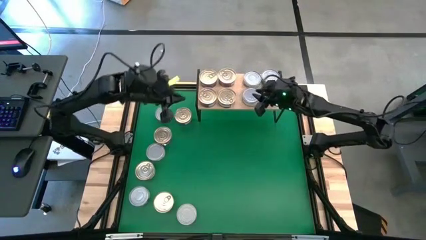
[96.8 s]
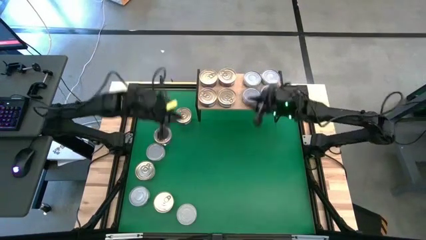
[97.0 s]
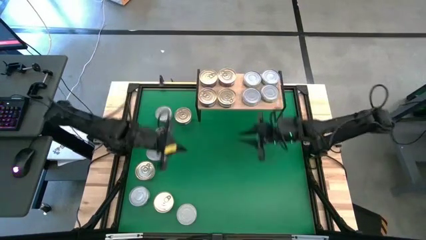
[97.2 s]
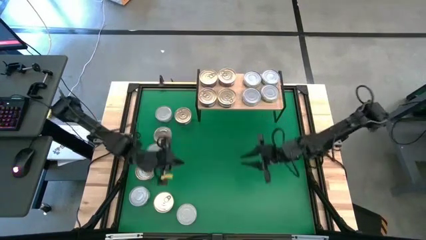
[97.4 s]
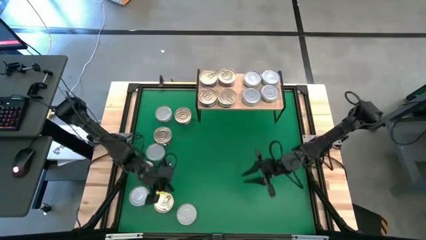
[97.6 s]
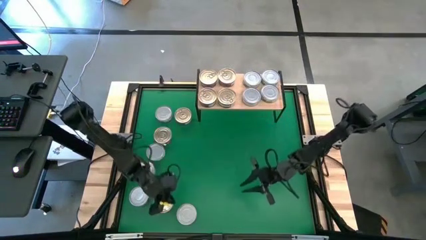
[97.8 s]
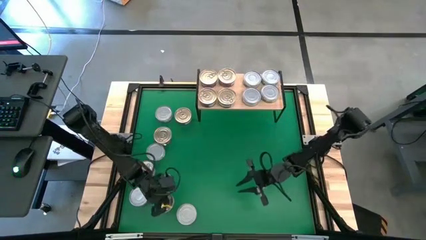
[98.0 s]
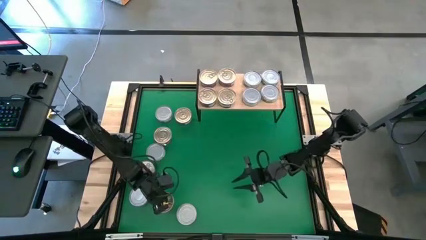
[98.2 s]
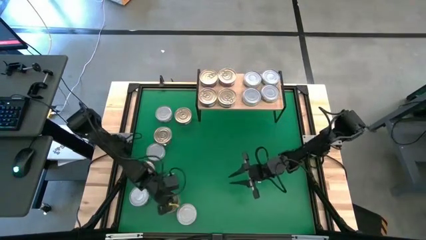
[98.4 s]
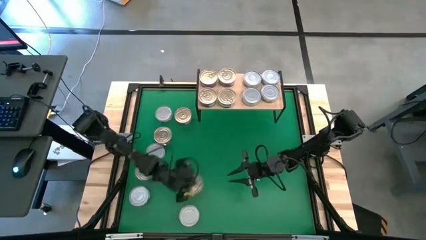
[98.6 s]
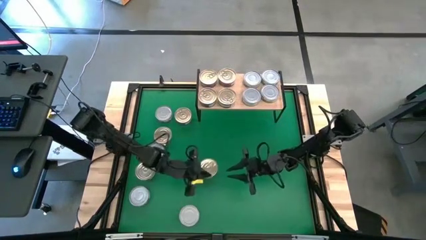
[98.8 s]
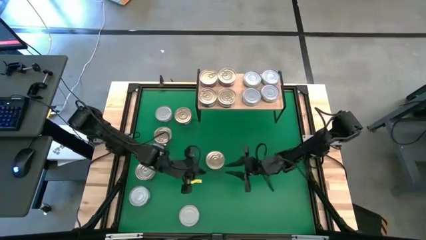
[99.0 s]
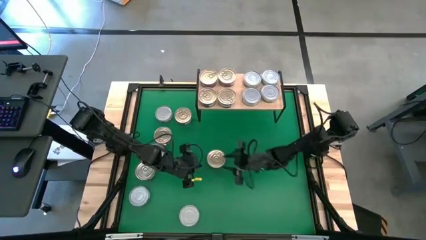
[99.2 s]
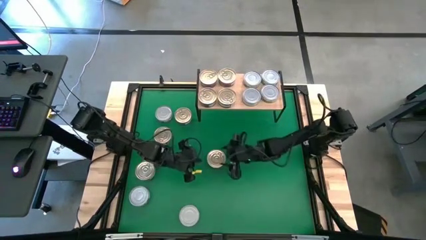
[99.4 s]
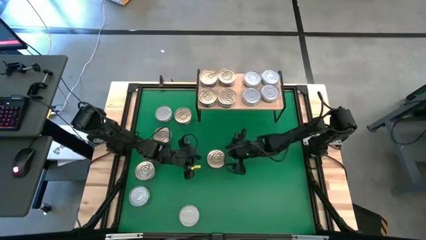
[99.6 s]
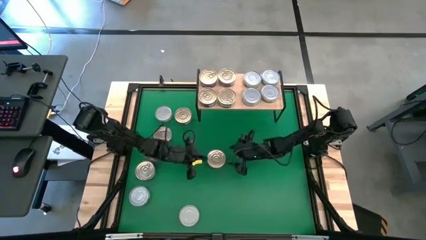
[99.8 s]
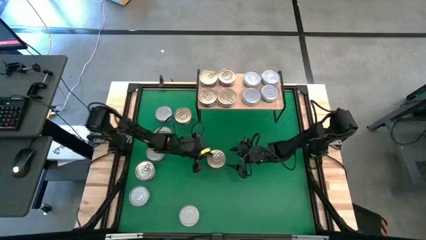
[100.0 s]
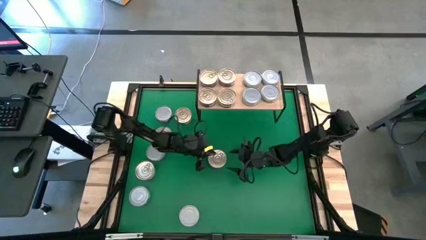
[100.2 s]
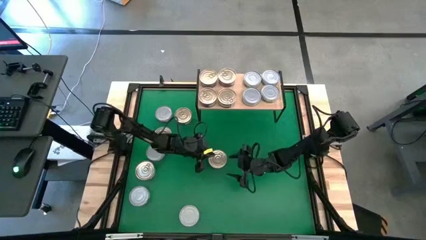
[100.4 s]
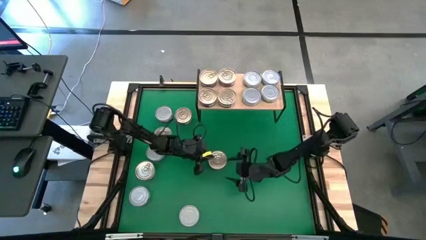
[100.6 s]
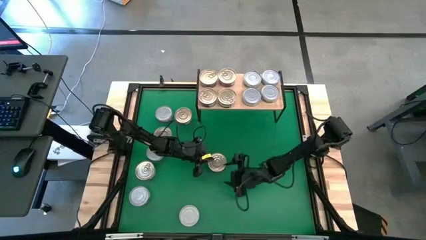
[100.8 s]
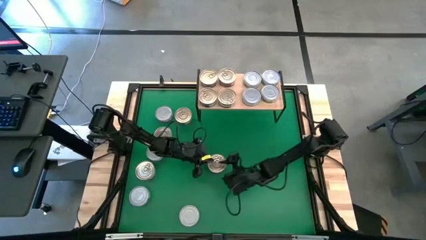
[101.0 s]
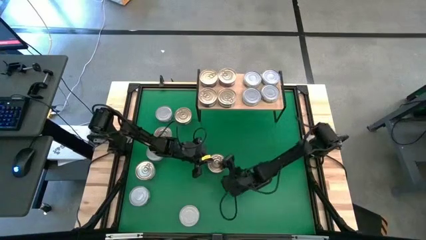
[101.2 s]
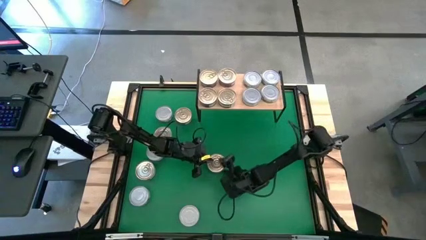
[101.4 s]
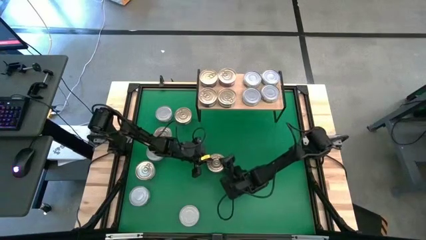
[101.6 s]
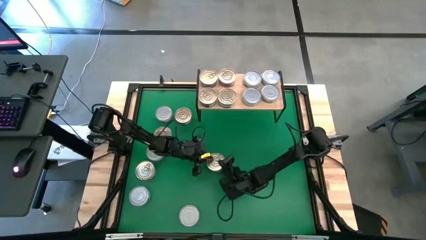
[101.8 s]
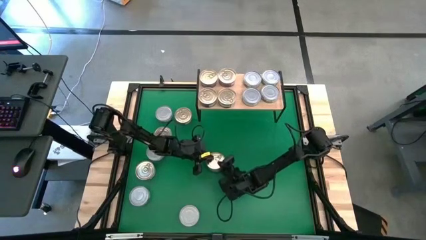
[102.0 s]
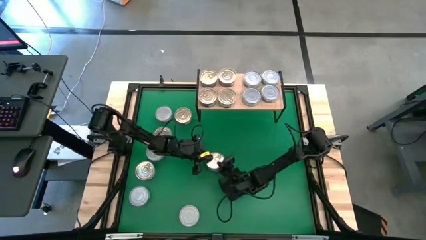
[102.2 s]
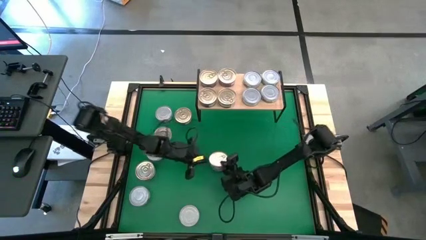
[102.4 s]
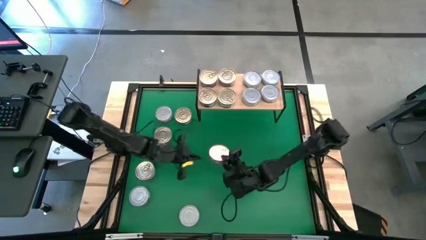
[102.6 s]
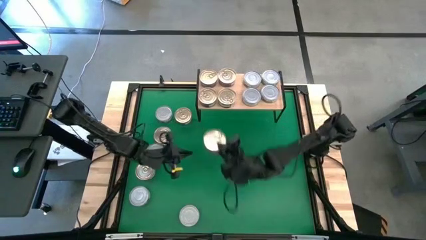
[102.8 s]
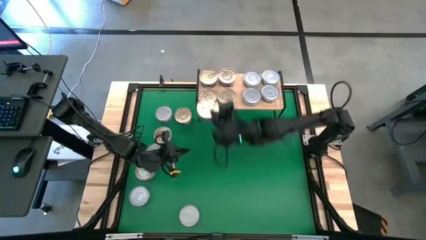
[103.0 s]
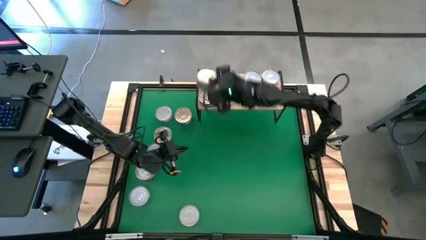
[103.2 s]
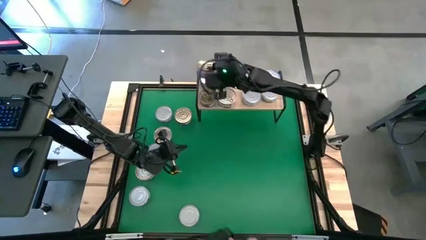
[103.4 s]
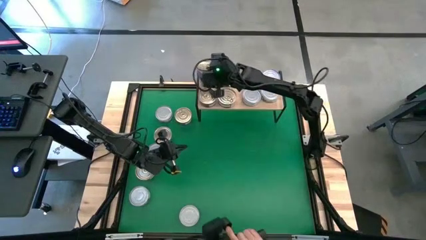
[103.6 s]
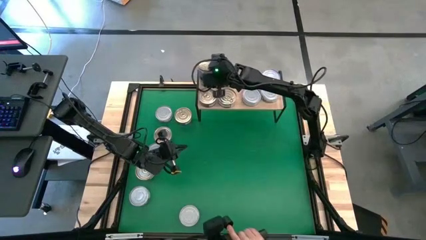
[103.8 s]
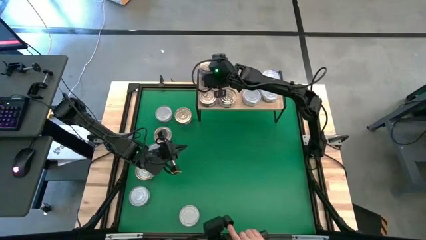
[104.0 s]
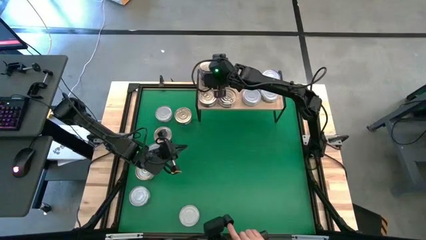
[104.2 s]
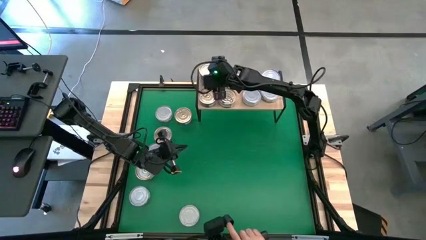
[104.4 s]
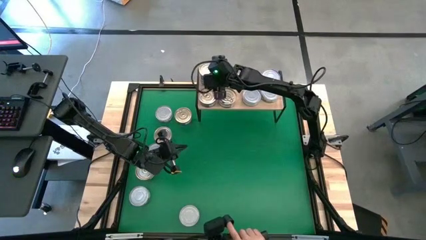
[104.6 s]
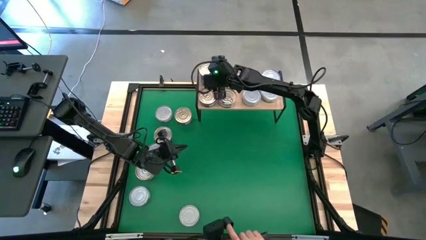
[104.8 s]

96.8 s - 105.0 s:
Task: Stack canned seafood by type on shelf
Stack the blue pink tuna can on top of the top left blue pink tuna can on the shelf

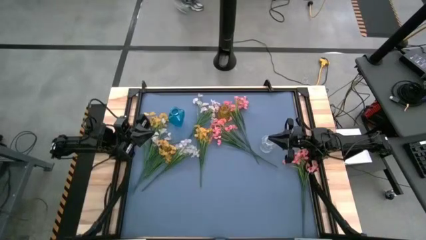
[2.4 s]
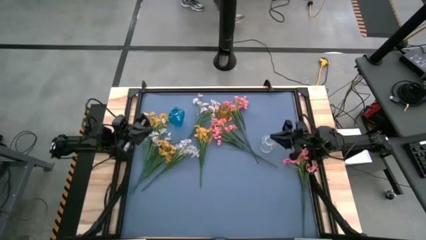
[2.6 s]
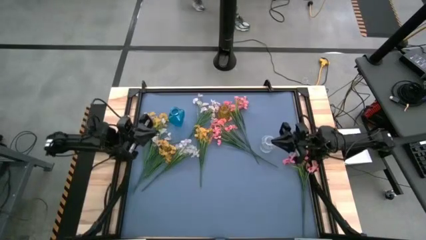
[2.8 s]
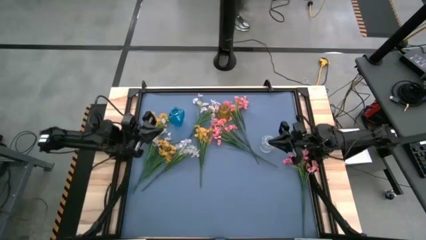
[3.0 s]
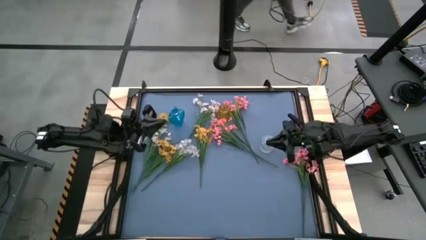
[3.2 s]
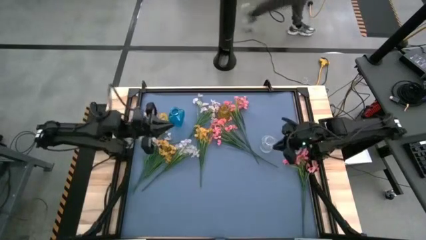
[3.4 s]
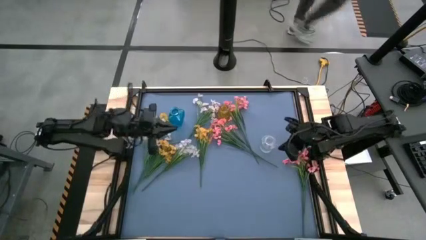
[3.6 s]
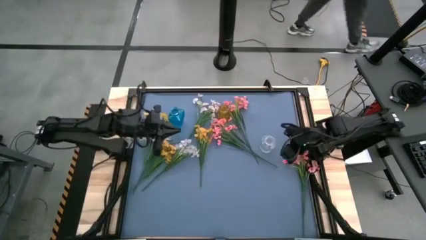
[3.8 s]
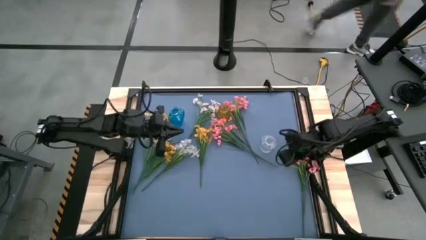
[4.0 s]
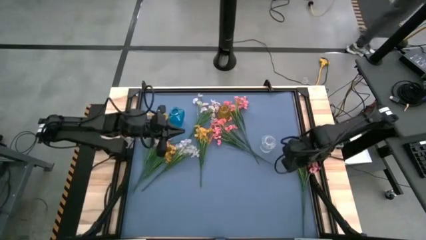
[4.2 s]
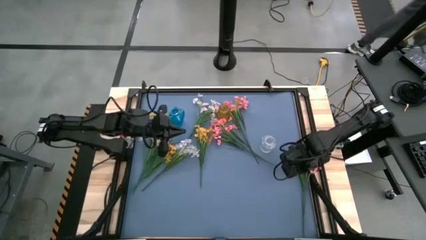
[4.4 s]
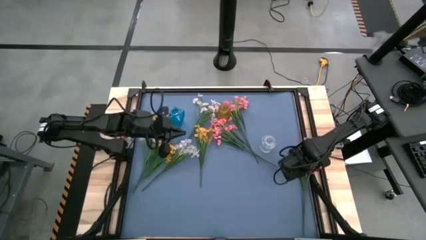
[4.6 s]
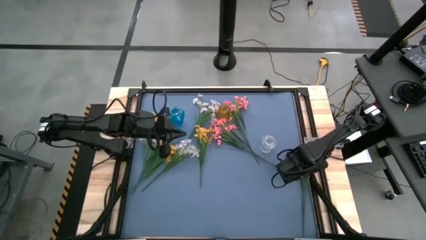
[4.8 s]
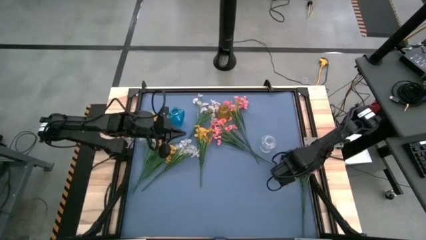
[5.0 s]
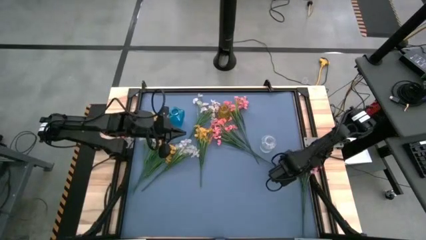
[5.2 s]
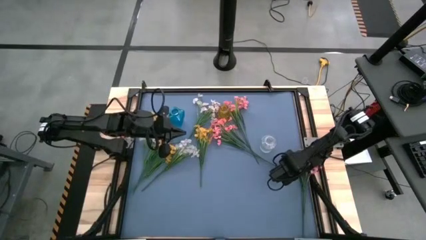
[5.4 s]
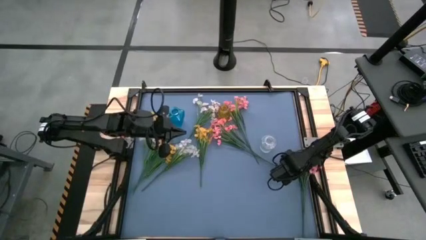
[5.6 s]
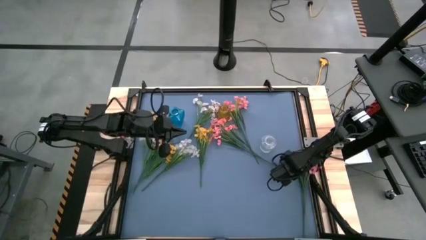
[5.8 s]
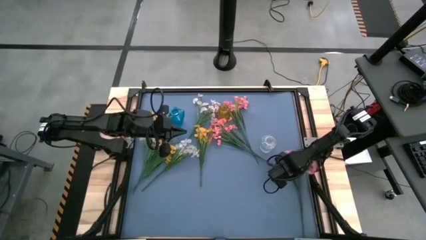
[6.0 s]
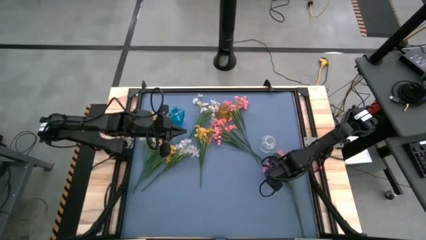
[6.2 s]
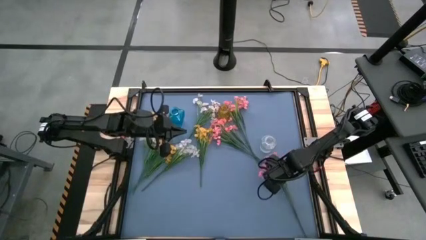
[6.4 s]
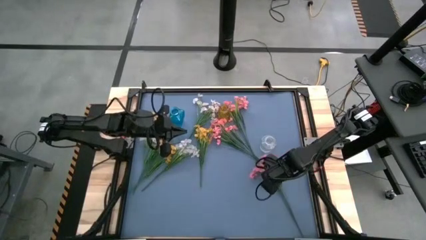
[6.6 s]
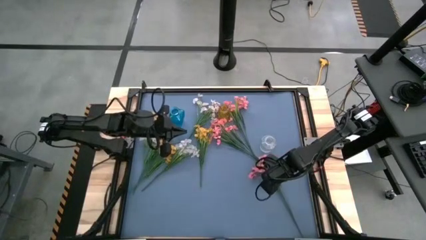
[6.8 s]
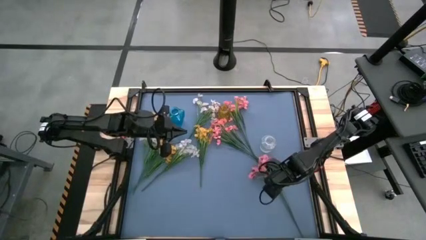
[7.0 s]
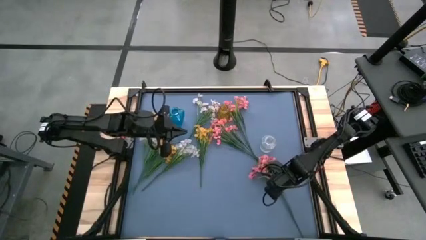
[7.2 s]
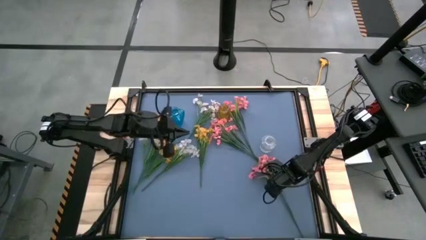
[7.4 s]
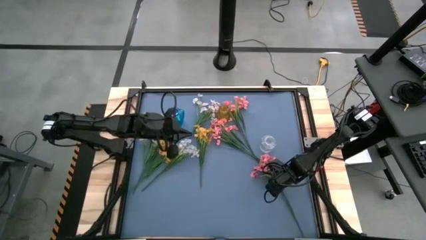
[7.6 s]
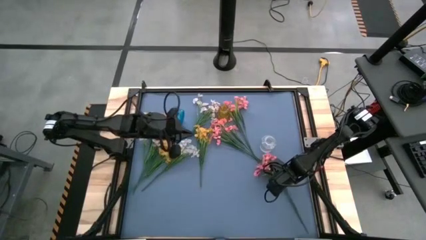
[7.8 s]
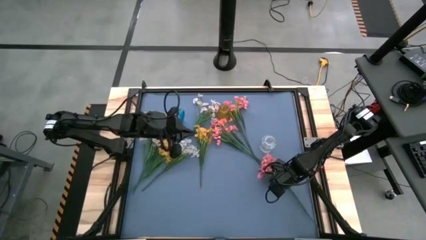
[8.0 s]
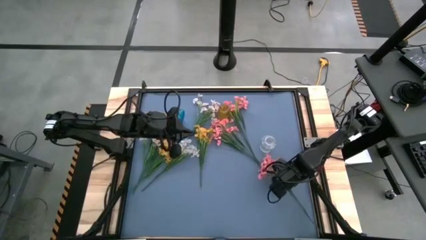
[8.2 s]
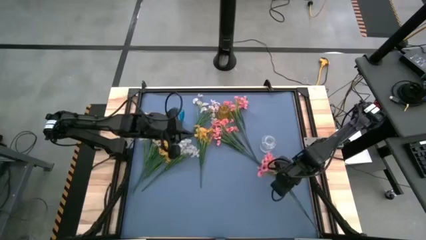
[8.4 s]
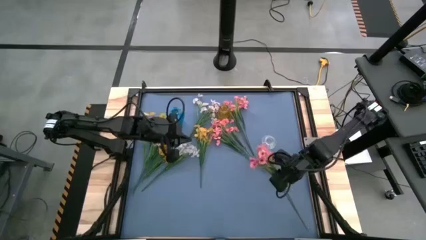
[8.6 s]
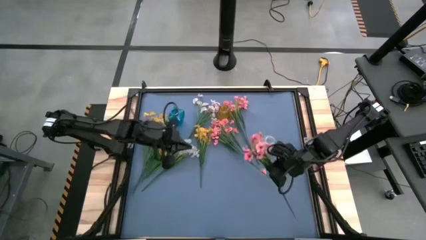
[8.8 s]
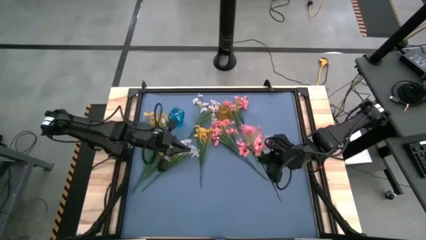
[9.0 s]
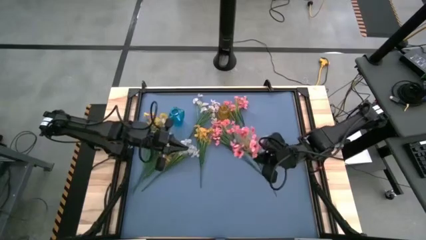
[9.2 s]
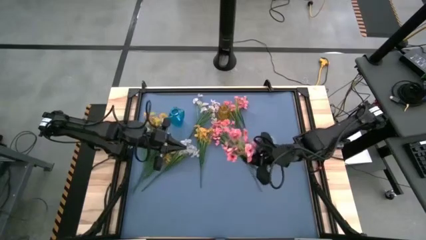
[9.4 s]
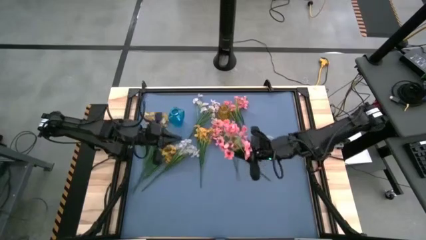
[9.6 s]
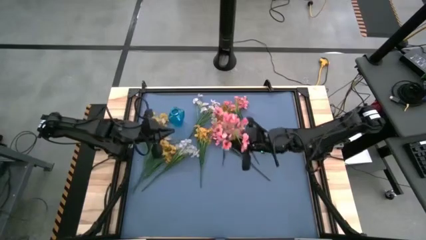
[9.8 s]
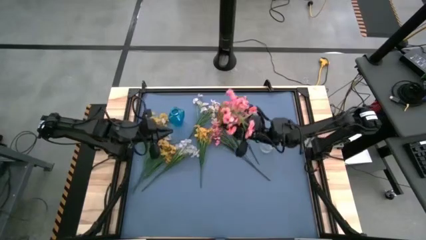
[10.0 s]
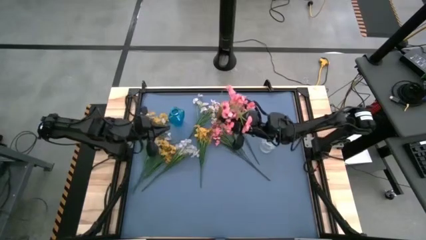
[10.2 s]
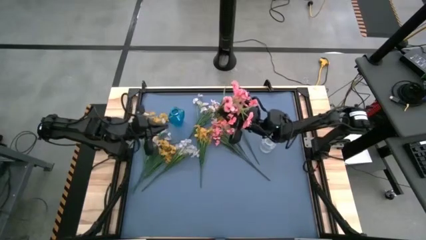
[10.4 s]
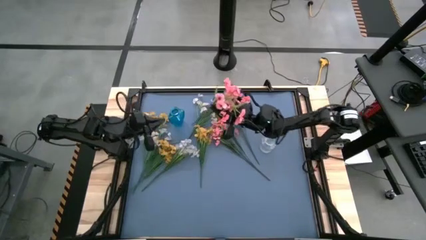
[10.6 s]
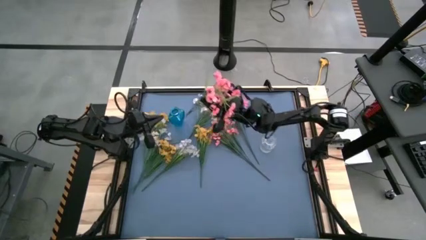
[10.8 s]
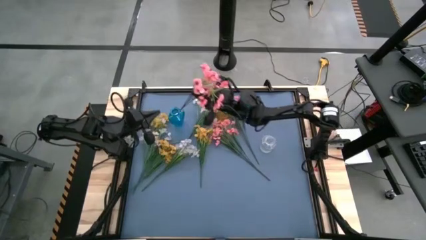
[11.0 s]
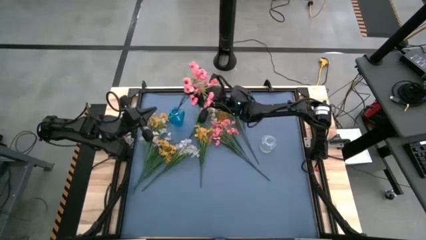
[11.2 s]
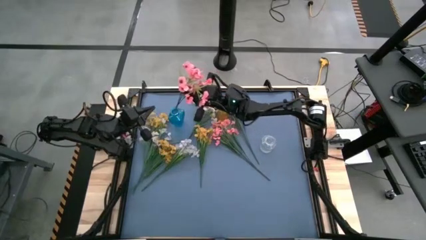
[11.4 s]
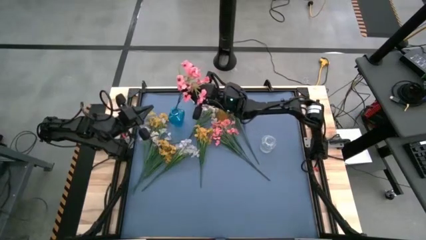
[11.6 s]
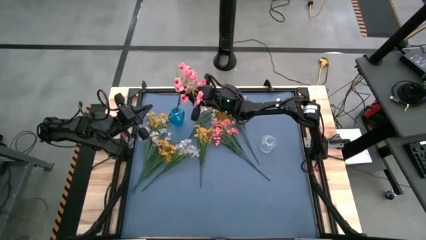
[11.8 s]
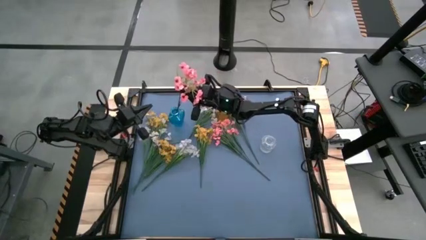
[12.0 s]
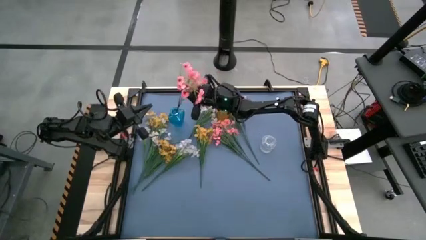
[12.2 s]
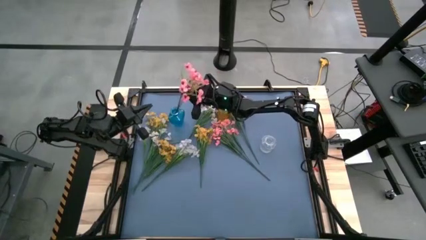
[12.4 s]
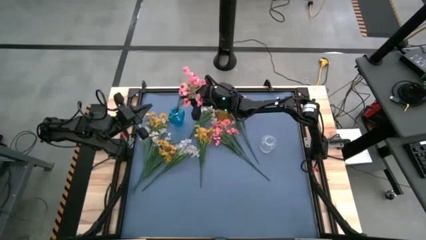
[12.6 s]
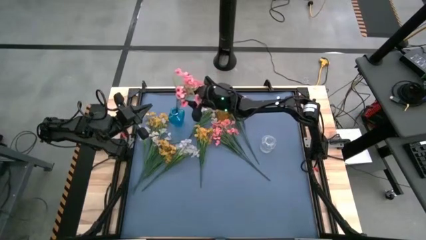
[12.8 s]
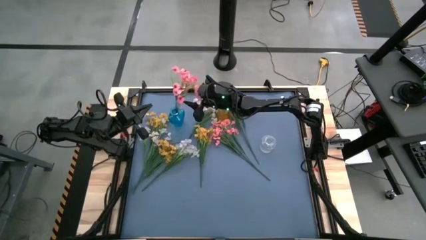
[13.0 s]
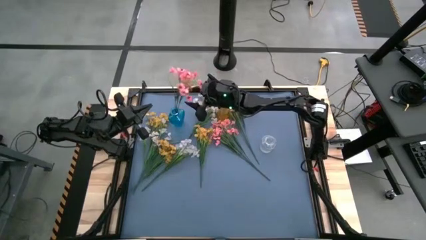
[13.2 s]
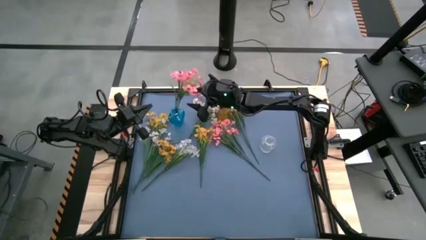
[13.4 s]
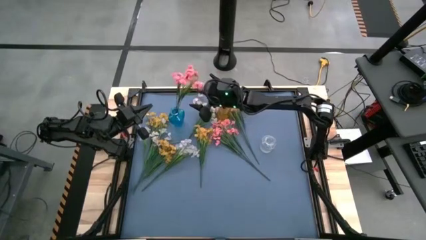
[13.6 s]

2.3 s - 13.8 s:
Task: Sort flowers into vase by color
Put the bottom pink flowers into the blue vase
